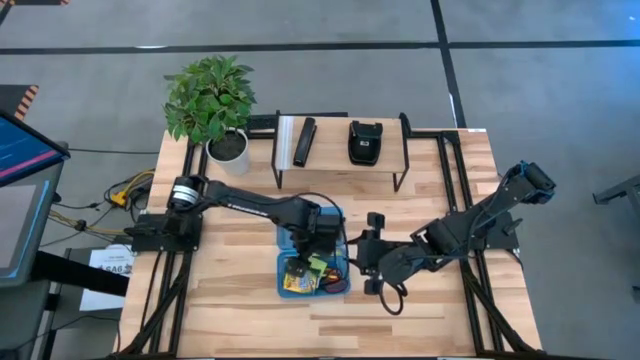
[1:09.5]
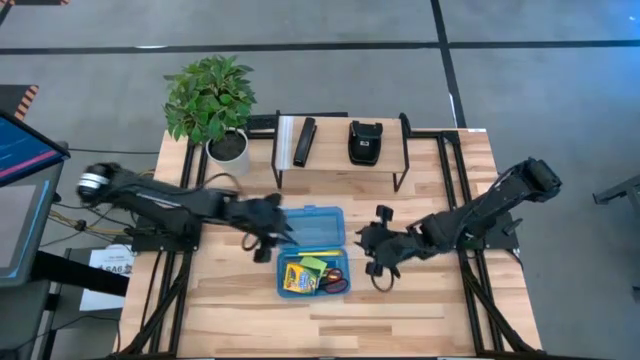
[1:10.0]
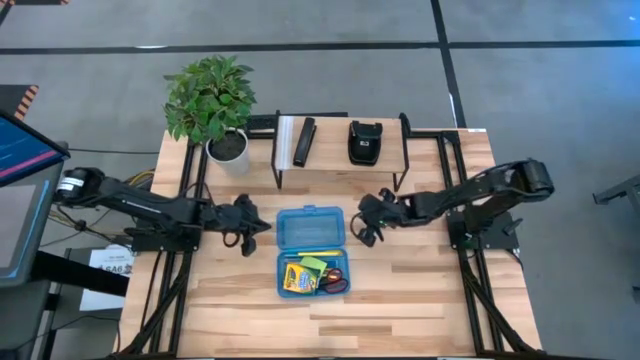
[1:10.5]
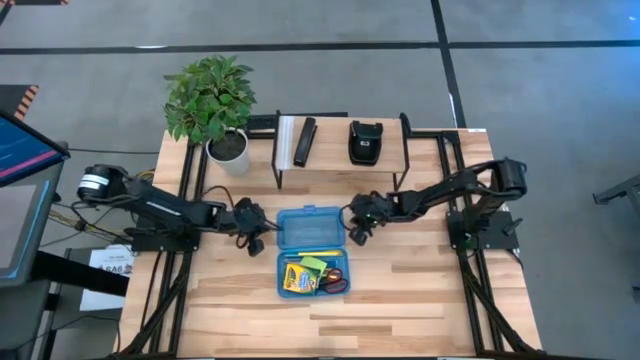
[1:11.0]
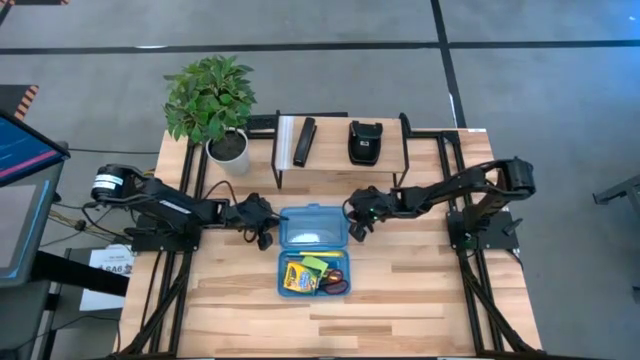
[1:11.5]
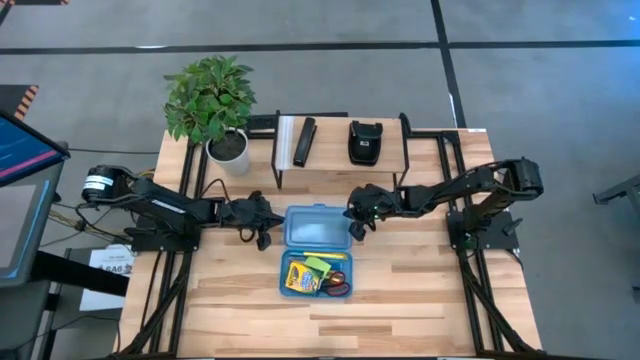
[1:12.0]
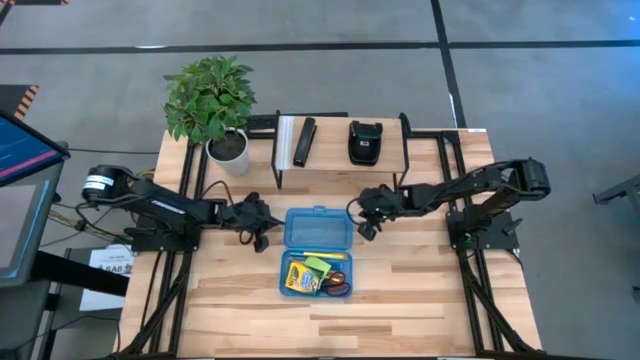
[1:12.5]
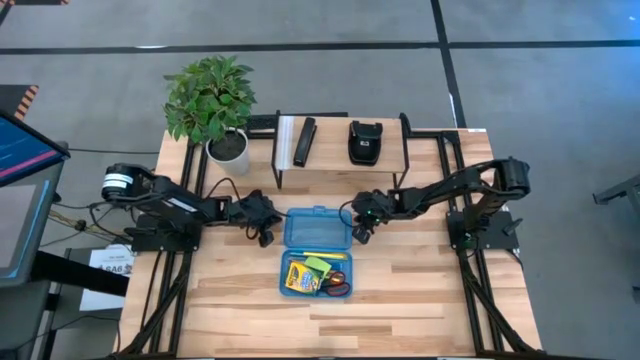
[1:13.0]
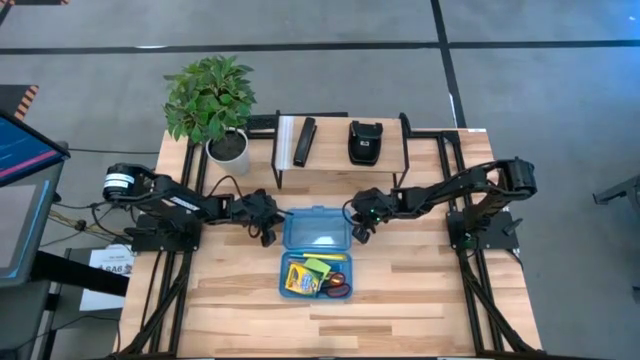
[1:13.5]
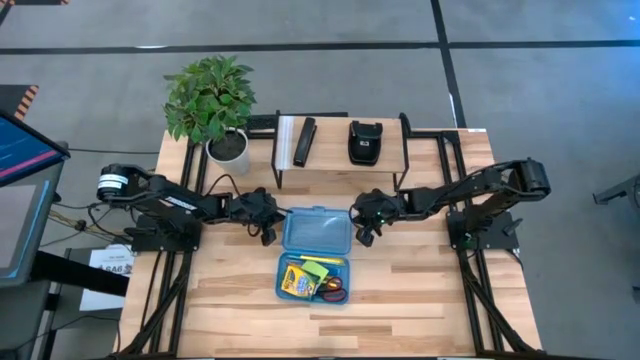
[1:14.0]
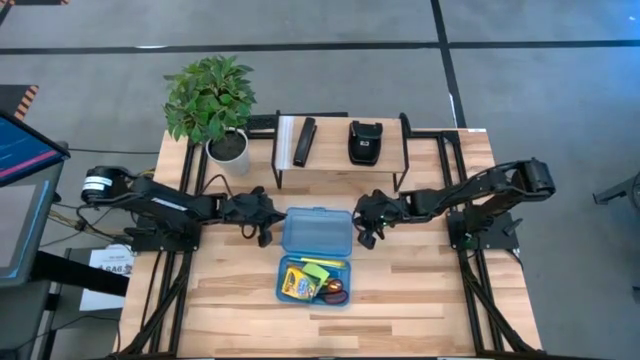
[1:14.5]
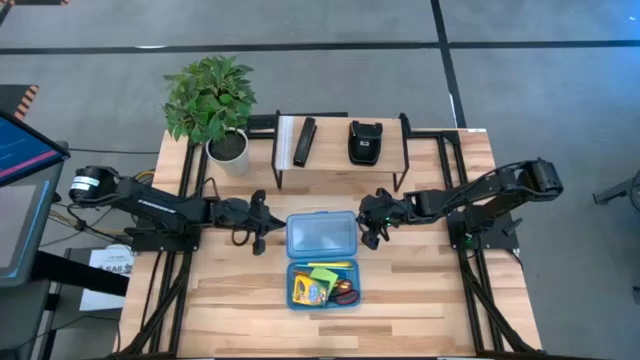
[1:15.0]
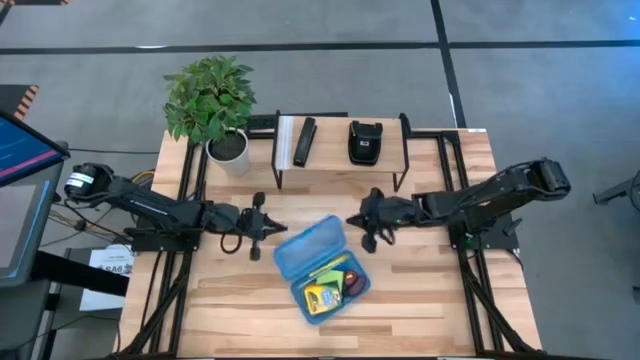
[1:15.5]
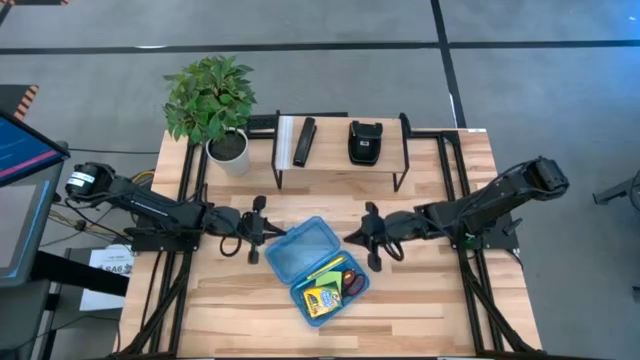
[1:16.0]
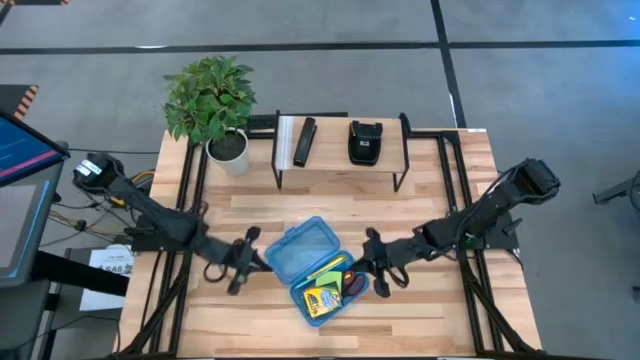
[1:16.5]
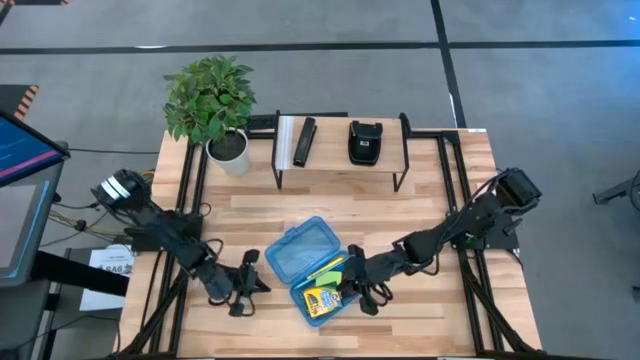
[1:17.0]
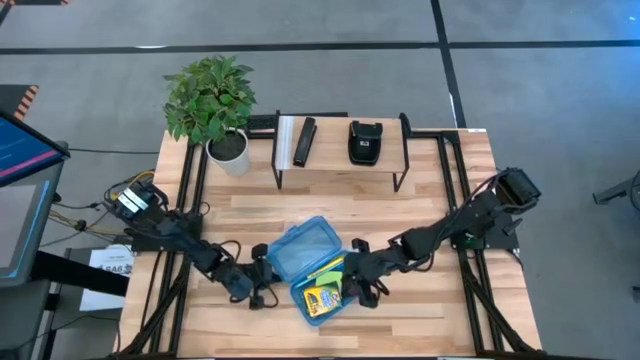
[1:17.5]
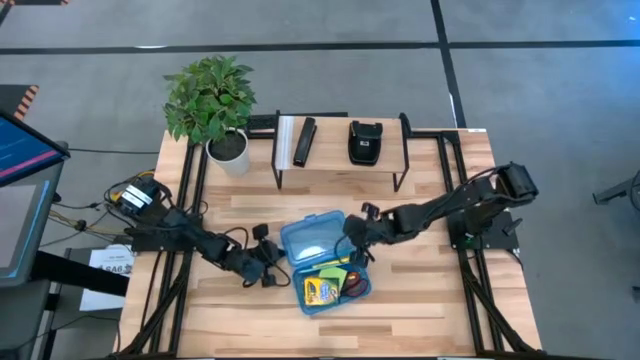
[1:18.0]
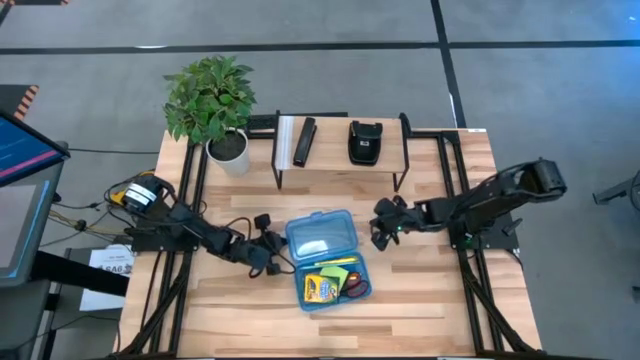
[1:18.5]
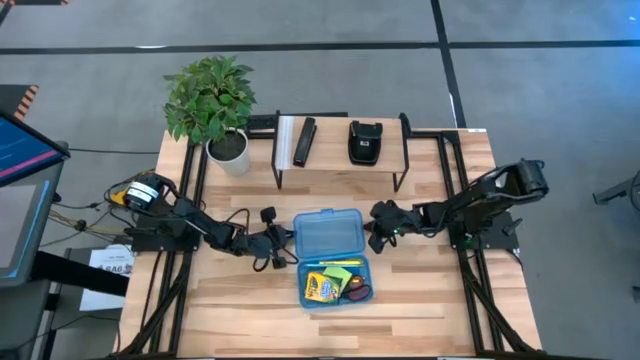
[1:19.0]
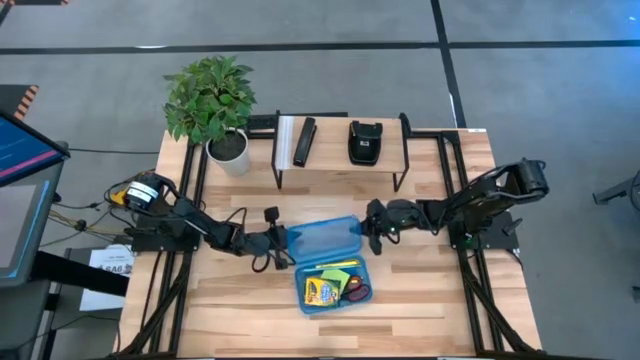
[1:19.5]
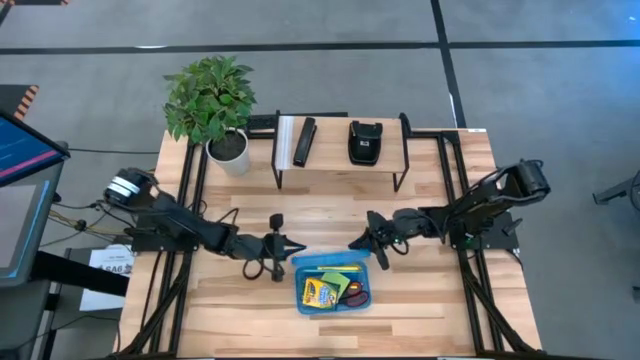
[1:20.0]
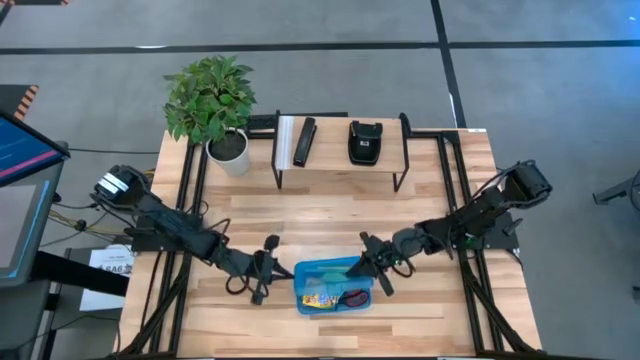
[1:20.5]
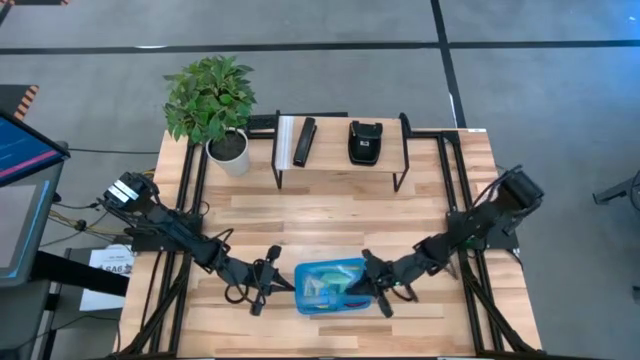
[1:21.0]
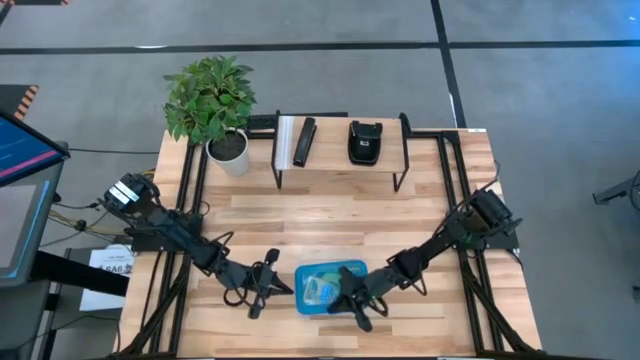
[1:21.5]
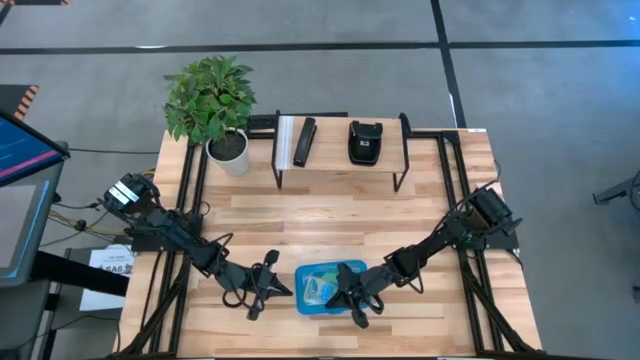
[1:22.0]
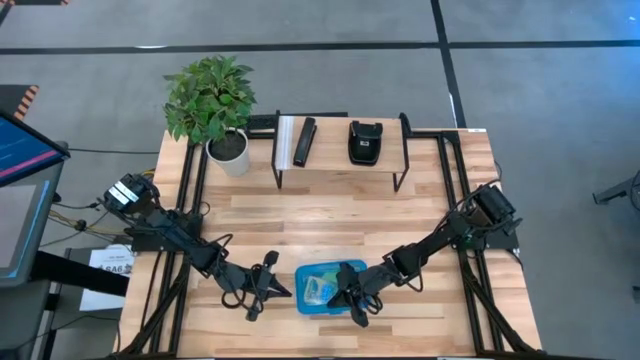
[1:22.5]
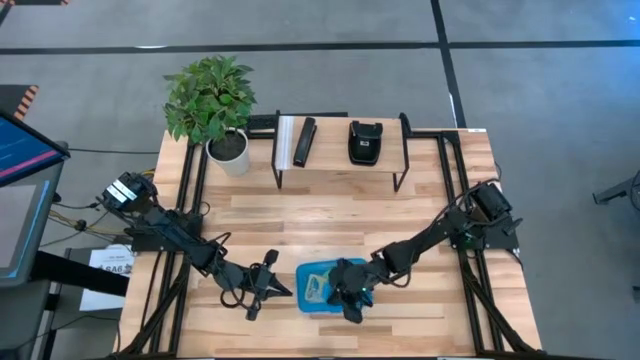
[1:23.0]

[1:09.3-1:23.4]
Task: Pack school essentials
Close the blue pencil box

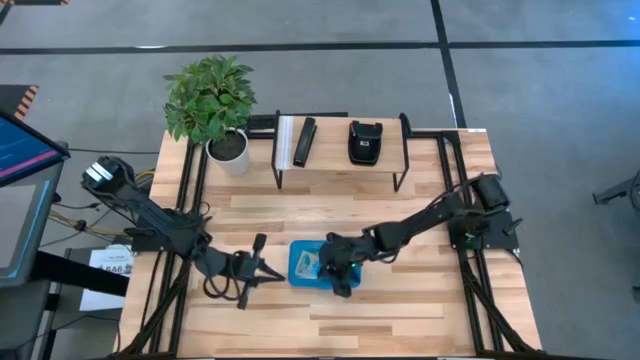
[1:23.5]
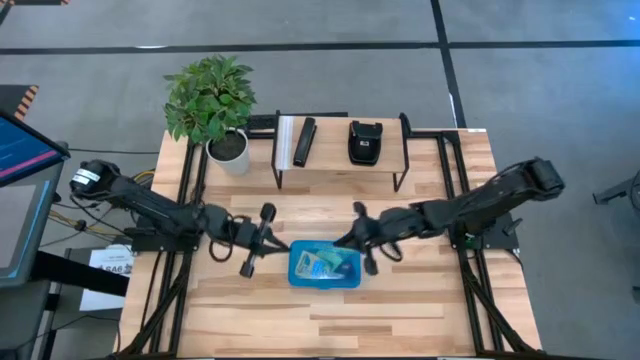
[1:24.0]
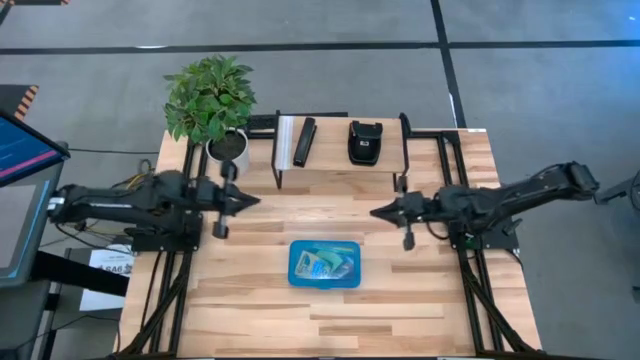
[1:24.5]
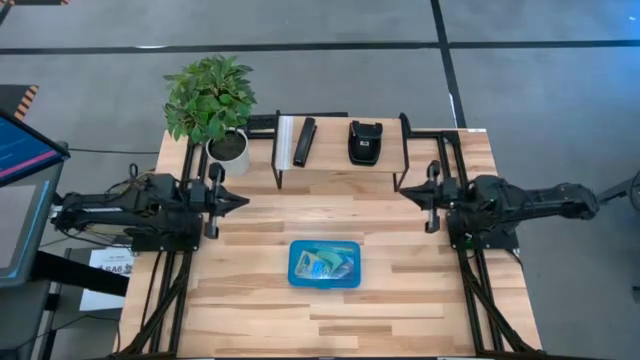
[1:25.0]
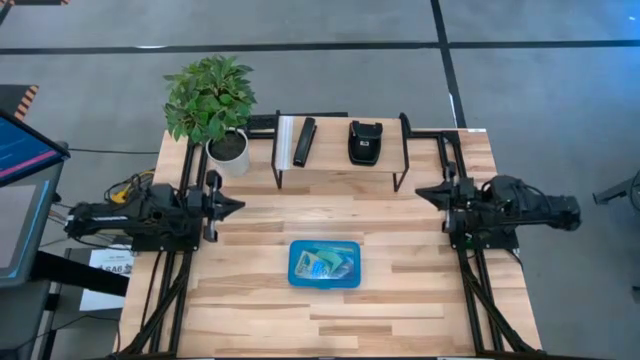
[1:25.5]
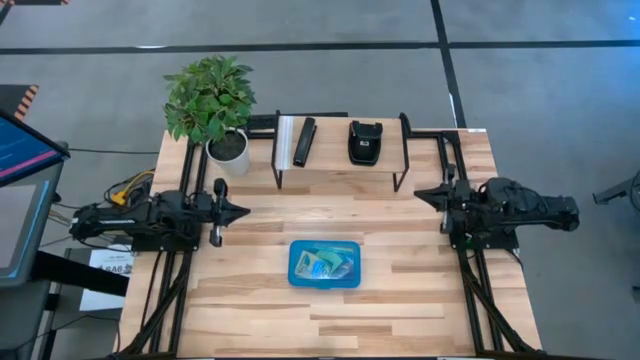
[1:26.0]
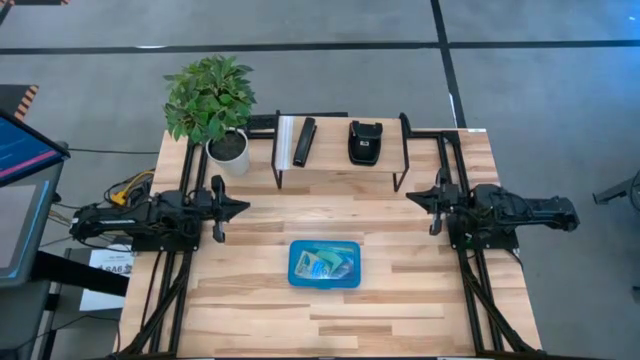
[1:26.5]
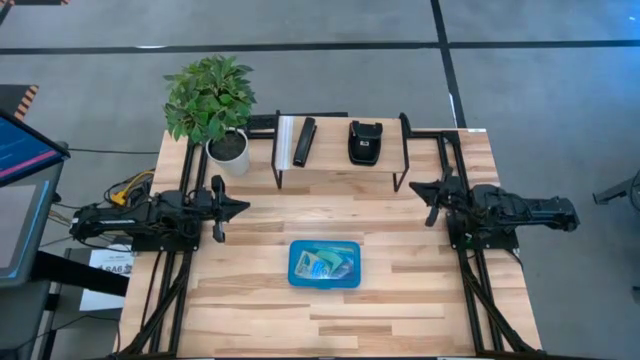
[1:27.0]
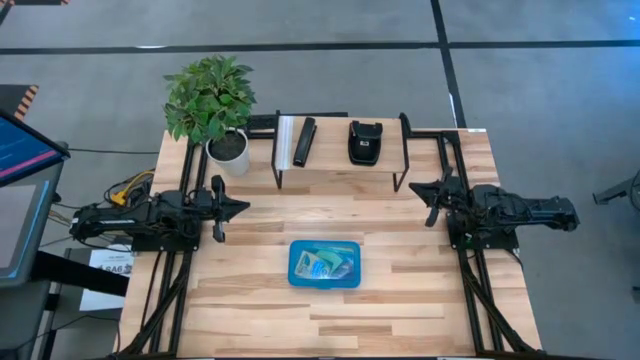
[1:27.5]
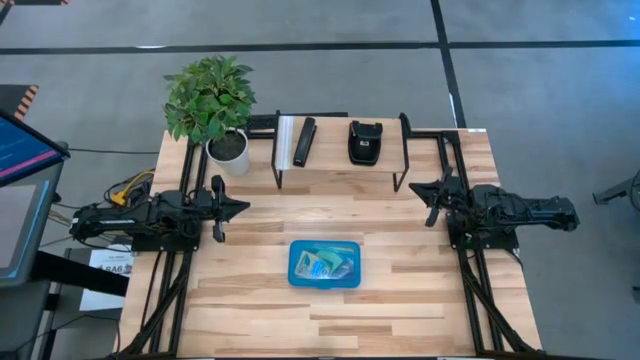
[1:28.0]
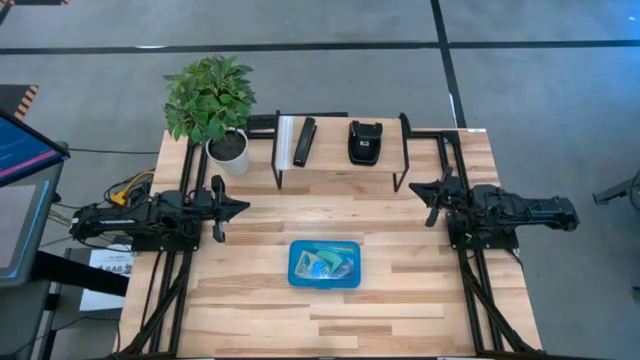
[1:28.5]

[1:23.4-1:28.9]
Return to Home Position

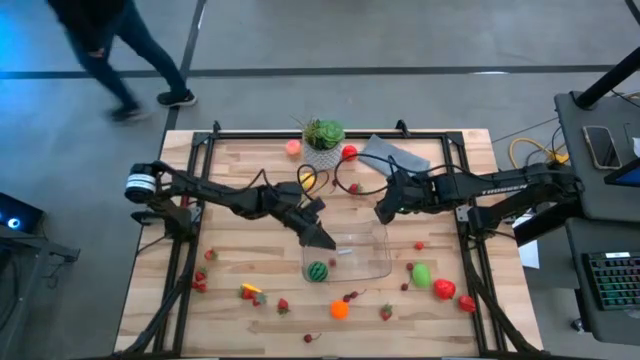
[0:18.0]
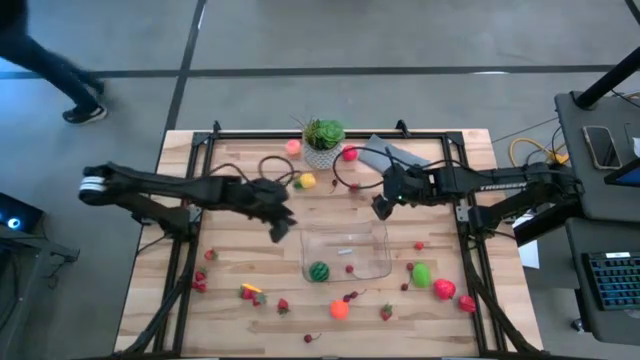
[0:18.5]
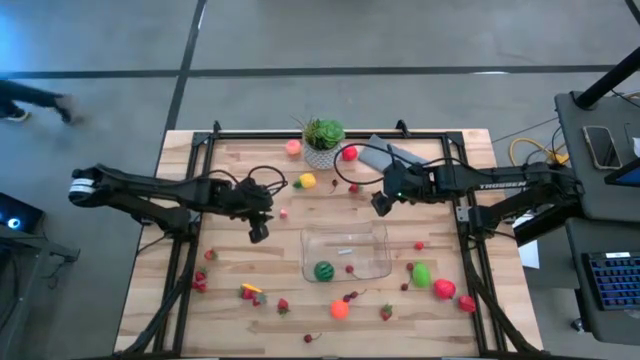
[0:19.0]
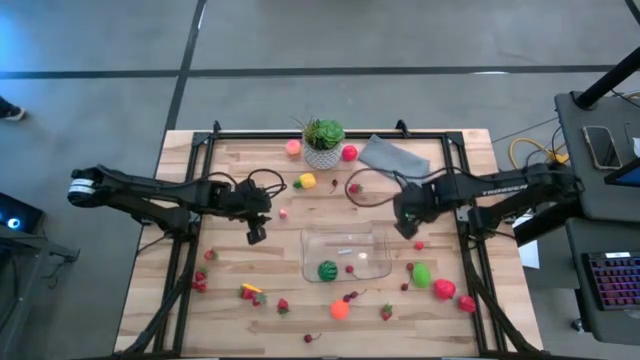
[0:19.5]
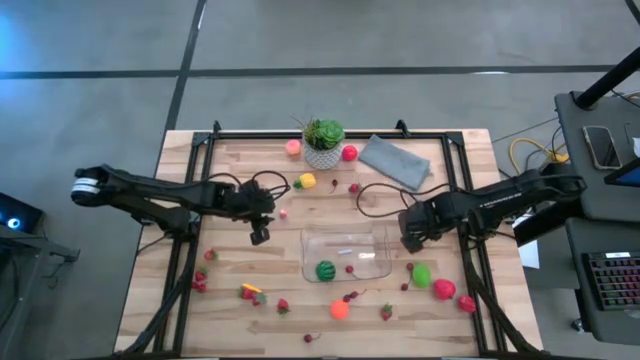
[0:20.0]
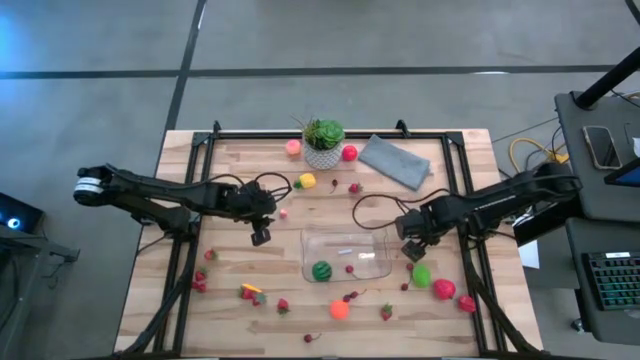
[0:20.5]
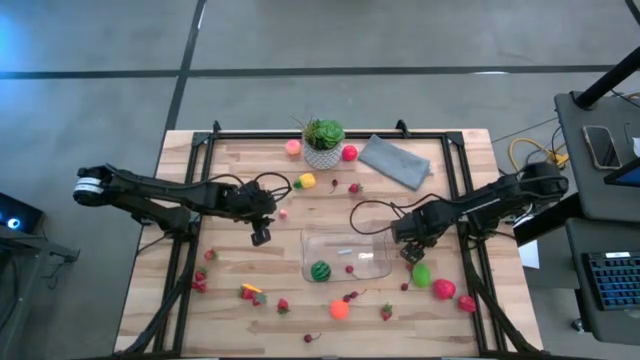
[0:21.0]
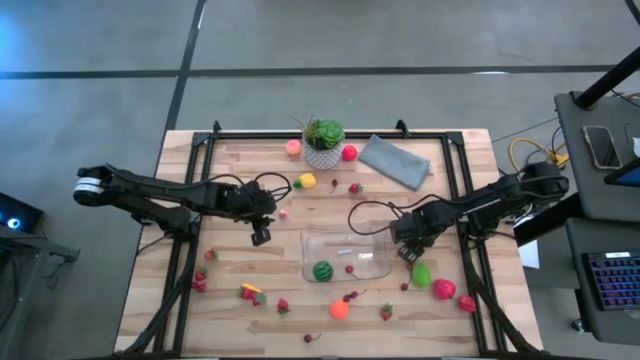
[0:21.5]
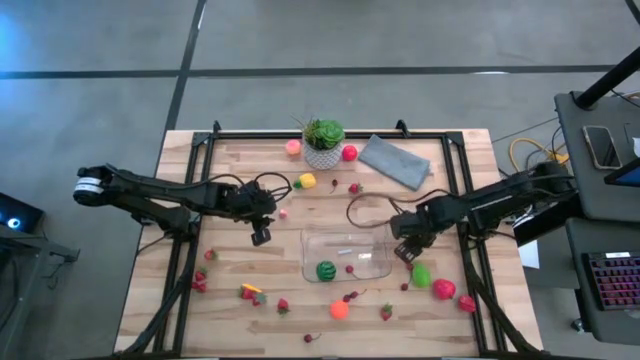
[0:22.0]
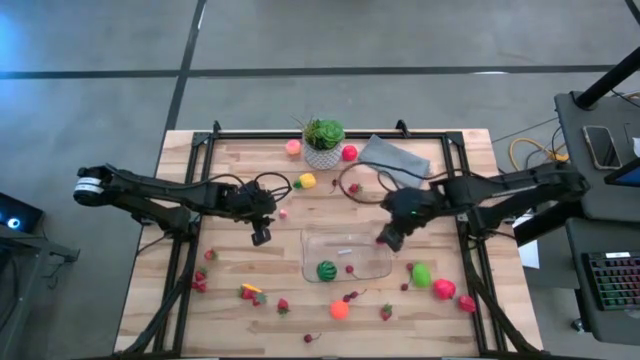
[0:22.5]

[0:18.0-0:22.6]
Task: Pick and placing Produce into tupperware
Put the cherry into the transparent bin
